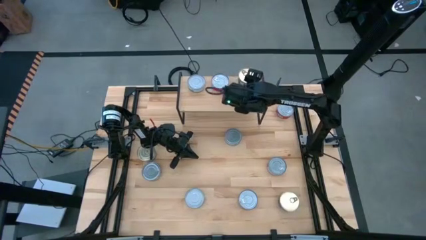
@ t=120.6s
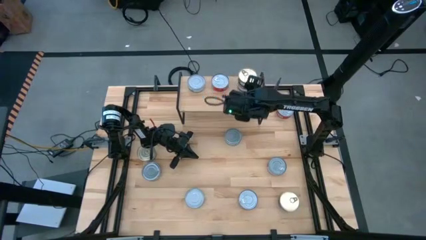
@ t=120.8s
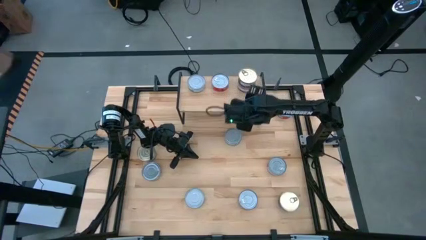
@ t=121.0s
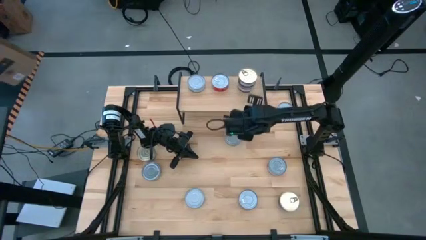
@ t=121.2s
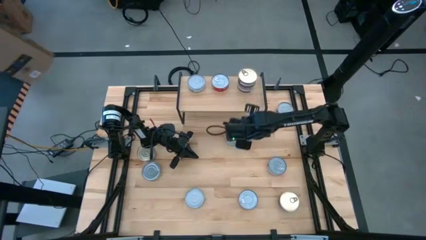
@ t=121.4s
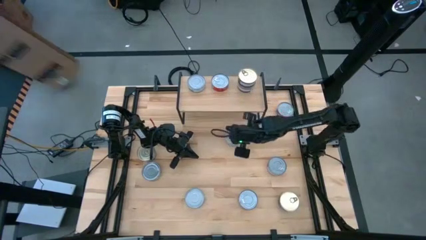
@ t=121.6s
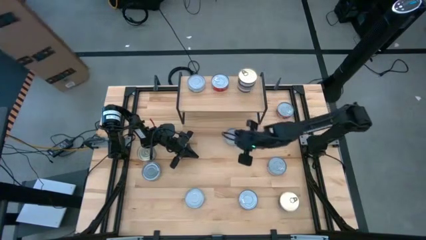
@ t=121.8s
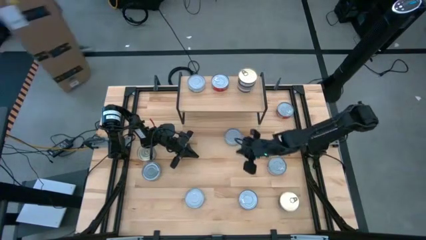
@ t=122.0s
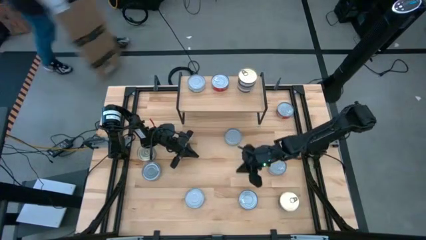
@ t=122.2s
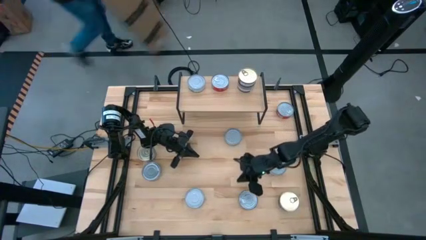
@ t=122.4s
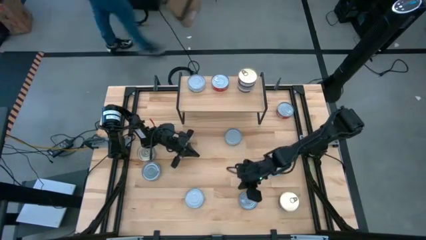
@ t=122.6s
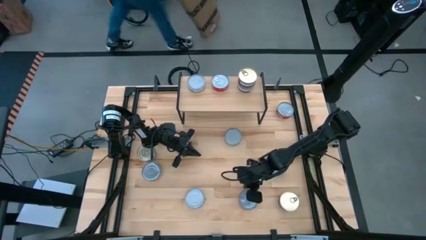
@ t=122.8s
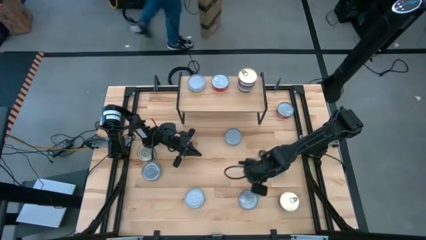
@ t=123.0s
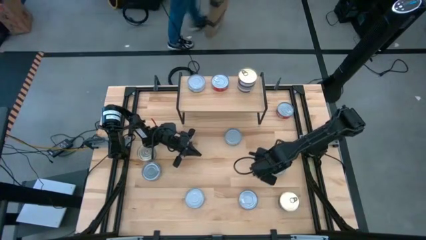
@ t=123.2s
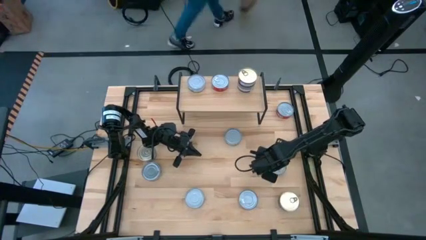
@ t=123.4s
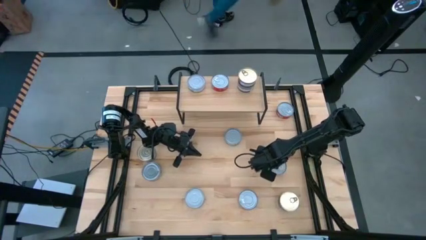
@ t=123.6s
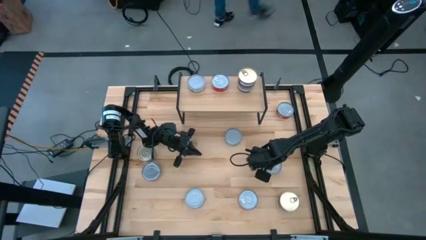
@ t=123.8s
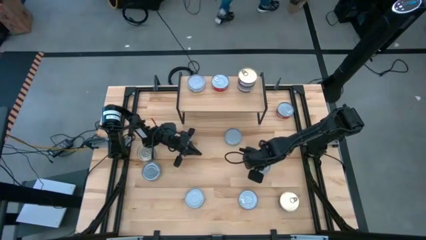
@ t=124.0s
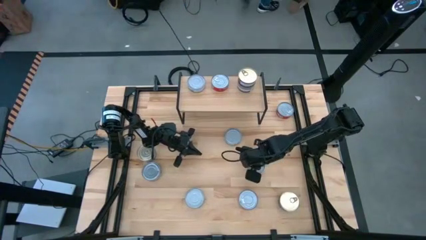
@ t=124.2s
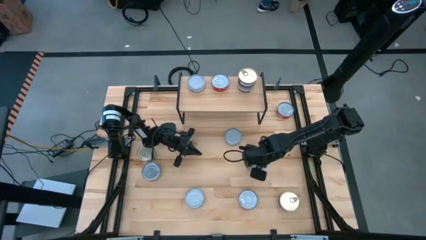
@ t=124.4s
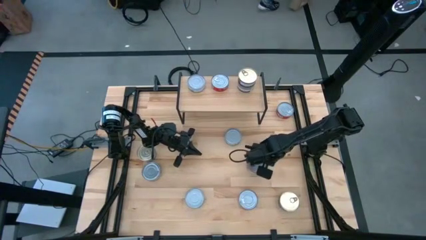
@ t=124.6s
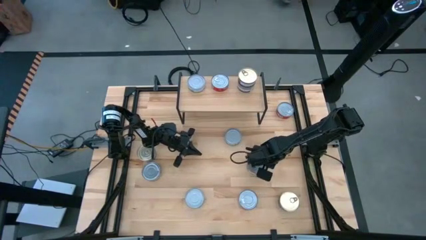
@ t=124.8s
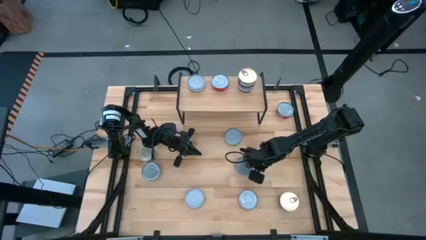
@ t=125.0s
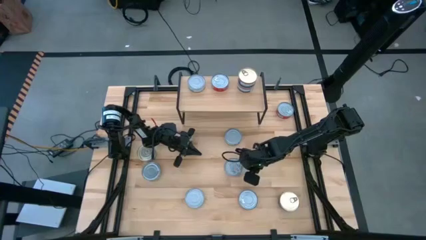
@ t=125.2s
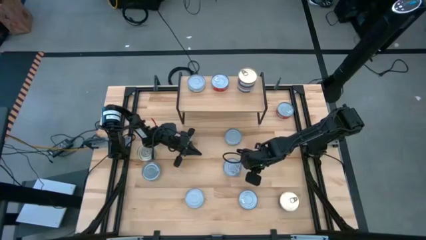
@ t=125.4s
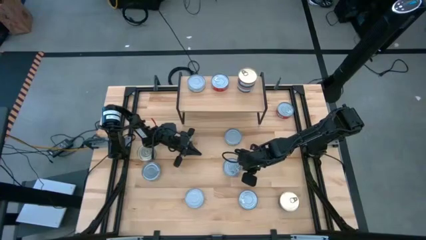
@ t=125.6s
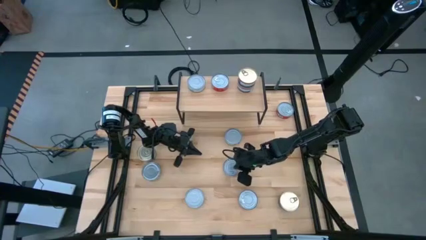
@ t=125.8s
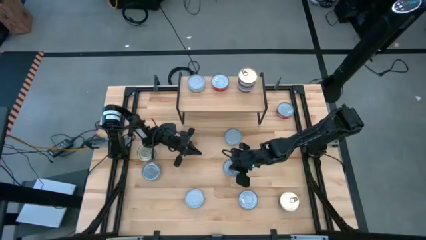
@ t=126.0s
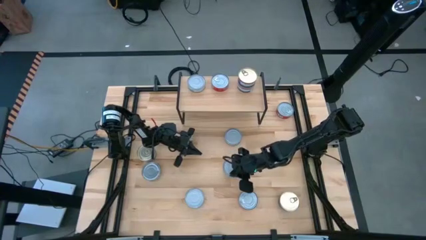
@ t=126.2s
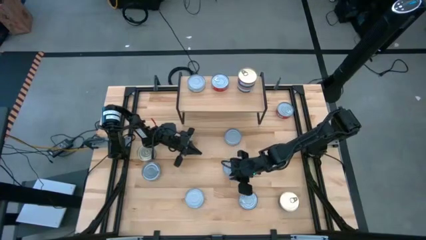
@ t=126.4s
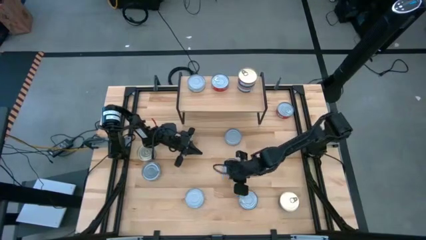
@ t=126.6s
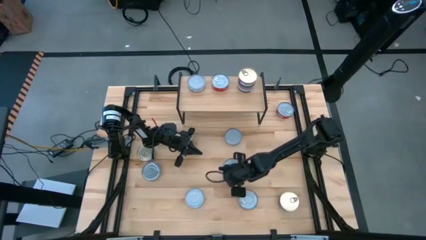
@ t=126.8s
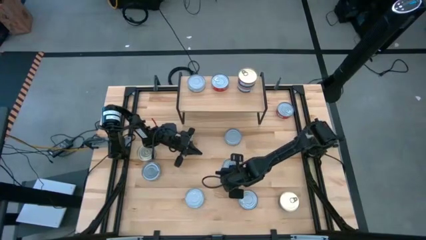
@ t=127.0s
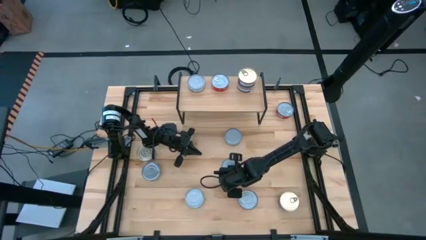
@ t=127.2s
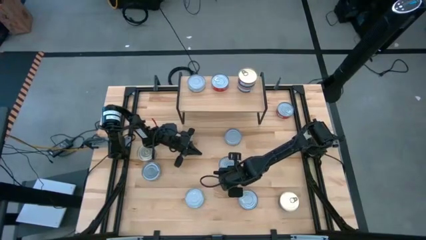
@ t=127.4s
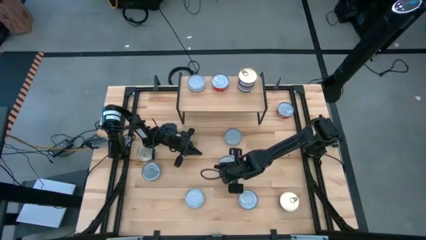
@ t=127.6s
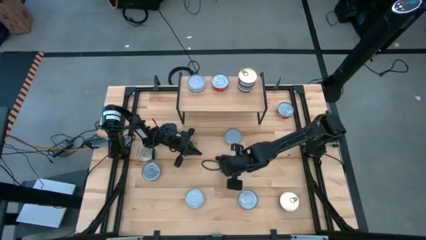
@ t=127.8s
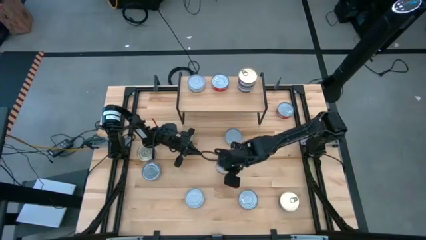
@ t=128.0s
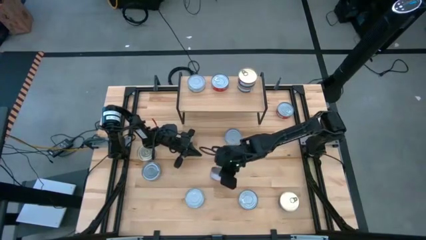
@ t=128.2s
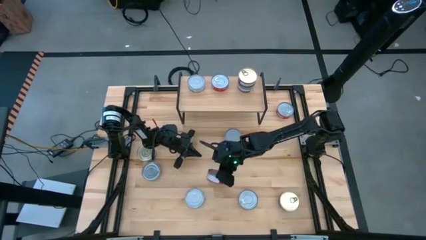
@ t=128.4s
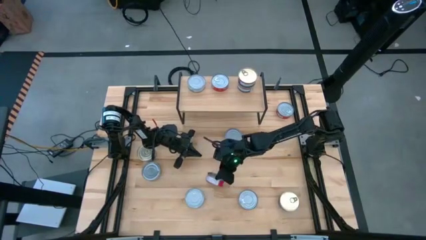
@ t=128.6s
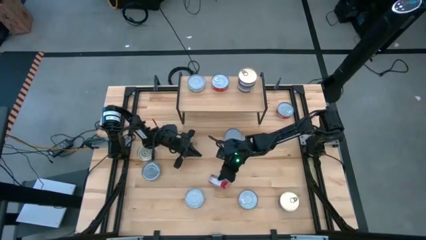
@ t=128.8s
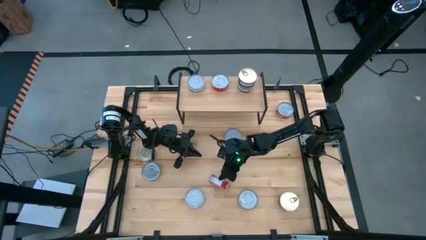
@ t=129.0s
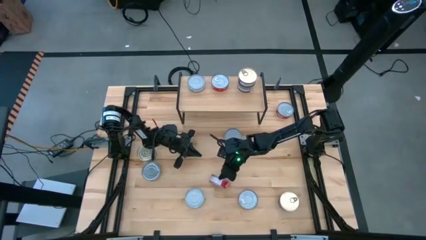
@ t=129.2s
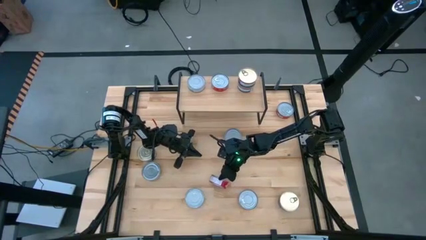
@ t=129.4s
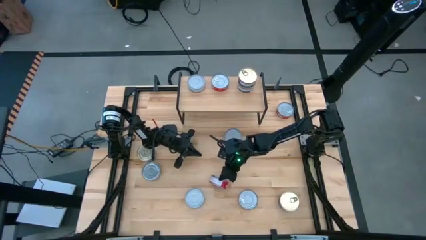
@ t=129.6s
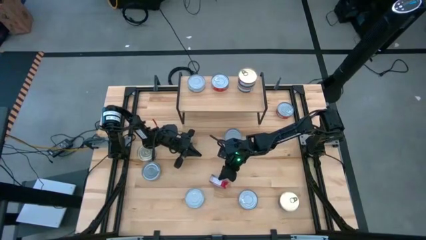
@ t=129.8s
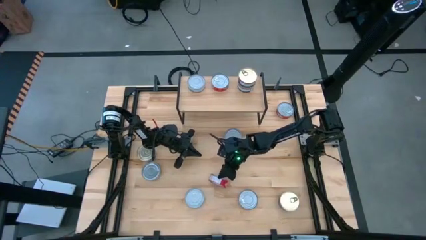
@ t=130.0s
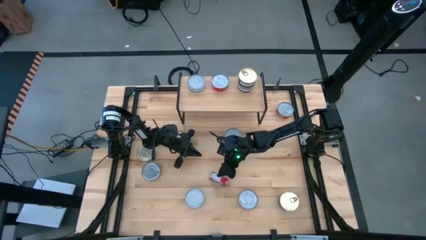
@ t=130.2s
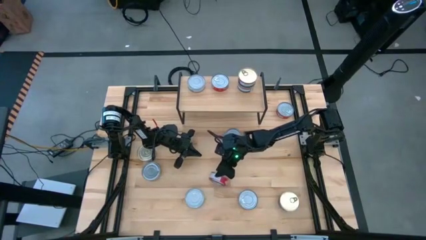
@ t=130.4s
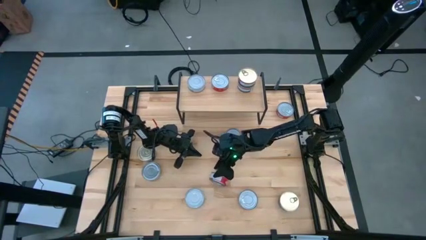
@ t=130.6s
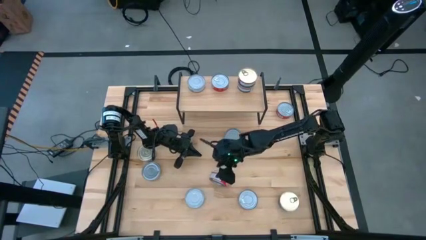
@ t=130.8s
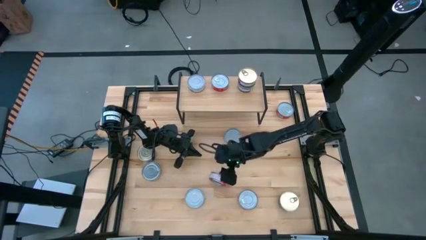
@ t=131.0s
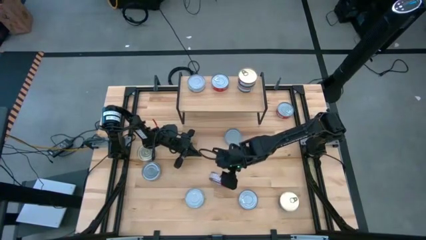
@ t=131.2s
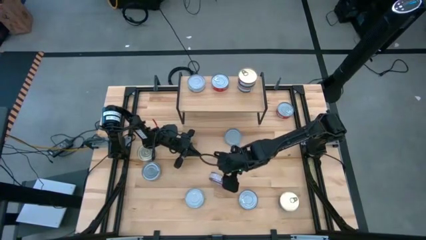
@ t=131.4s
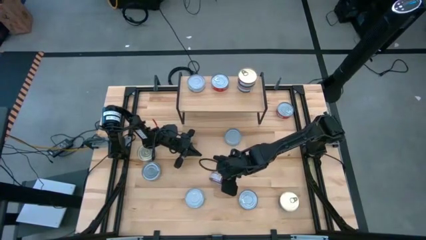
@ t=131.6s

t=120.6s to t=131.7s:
Task: Stack canned seafood by type on shelf
Stack the blue and pink tuna can on top of the blue and pink tuna can on the shelf

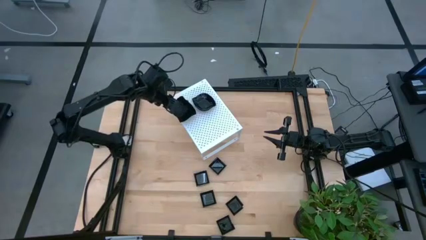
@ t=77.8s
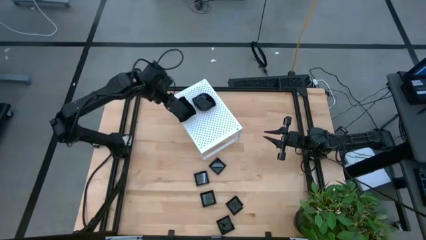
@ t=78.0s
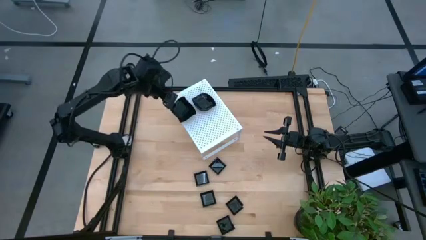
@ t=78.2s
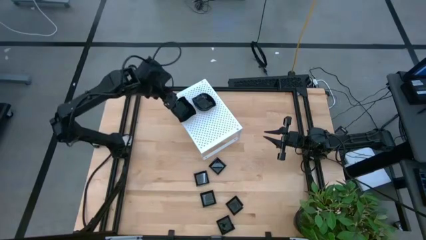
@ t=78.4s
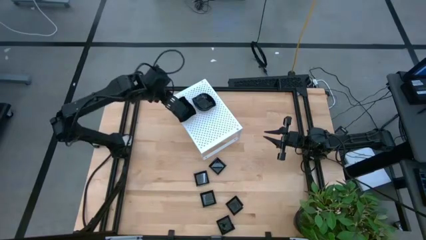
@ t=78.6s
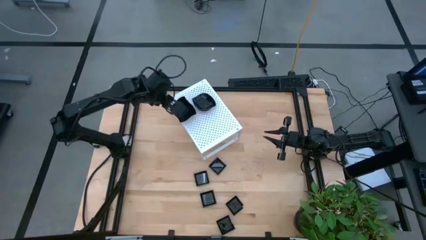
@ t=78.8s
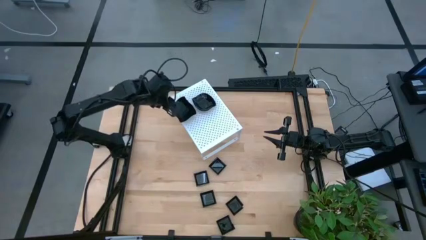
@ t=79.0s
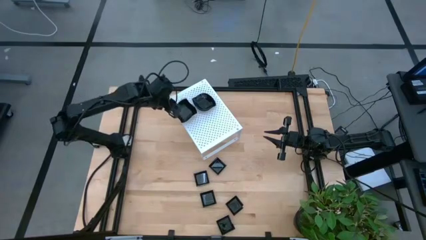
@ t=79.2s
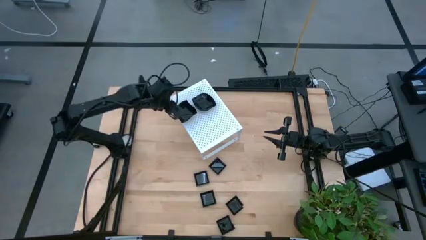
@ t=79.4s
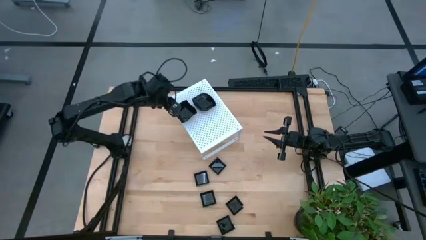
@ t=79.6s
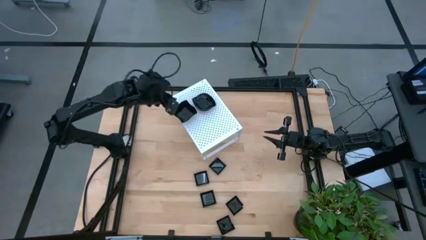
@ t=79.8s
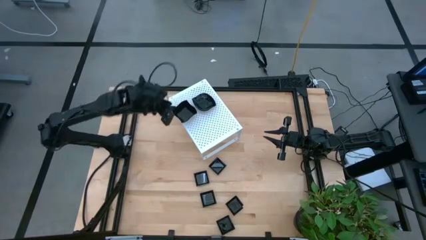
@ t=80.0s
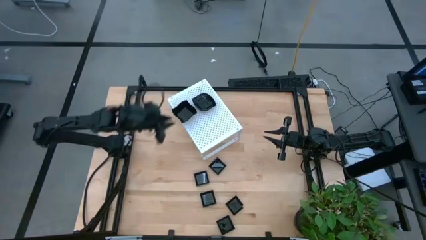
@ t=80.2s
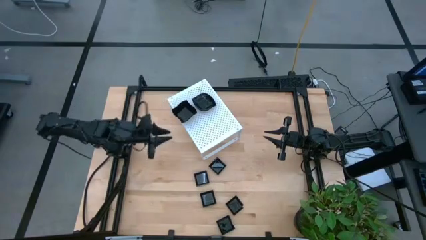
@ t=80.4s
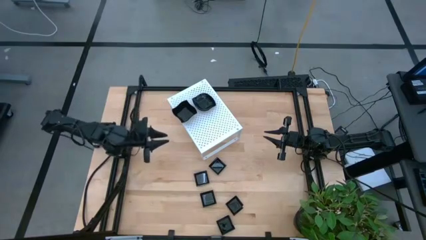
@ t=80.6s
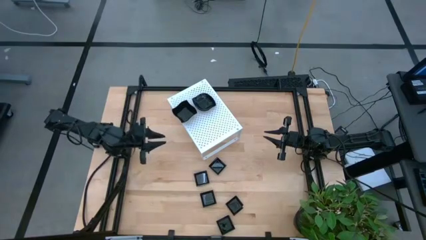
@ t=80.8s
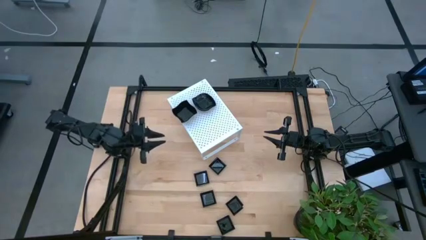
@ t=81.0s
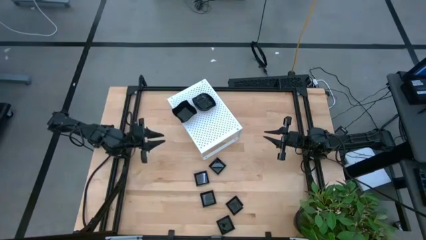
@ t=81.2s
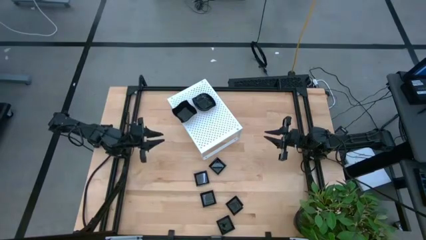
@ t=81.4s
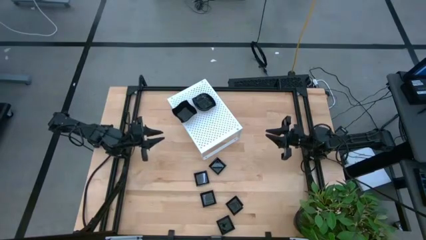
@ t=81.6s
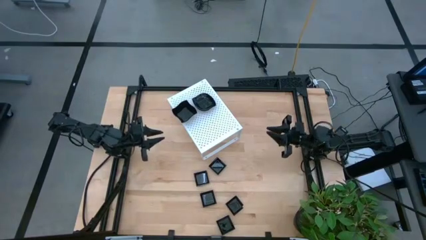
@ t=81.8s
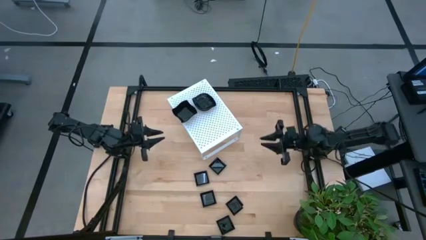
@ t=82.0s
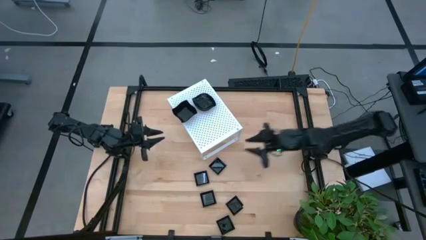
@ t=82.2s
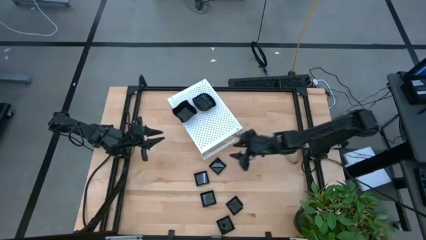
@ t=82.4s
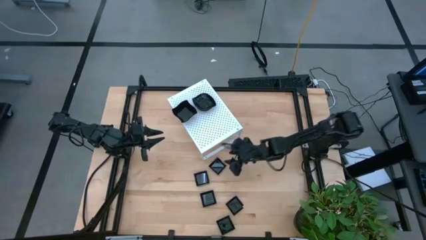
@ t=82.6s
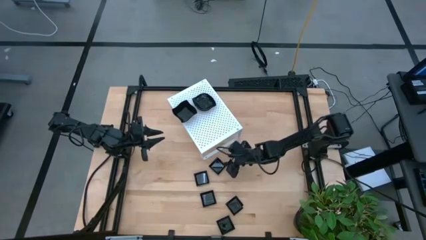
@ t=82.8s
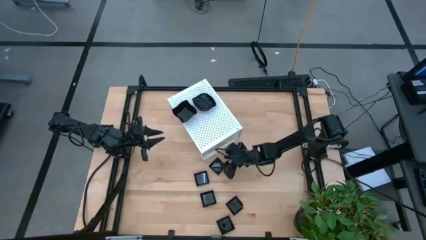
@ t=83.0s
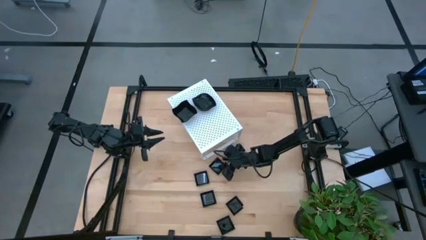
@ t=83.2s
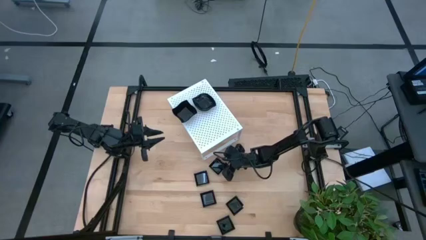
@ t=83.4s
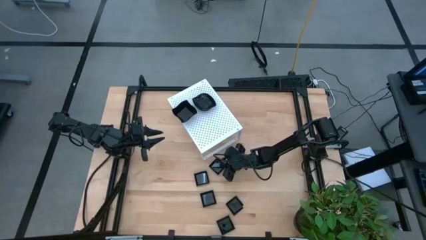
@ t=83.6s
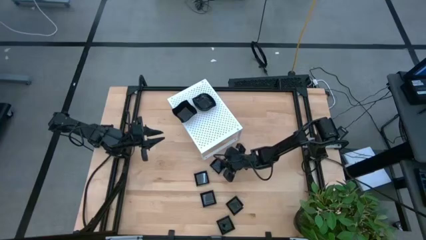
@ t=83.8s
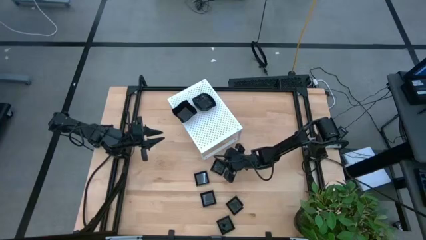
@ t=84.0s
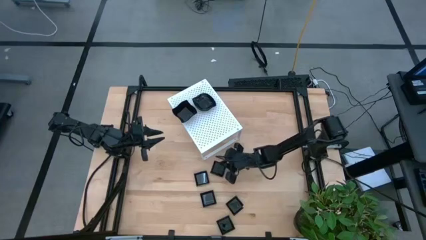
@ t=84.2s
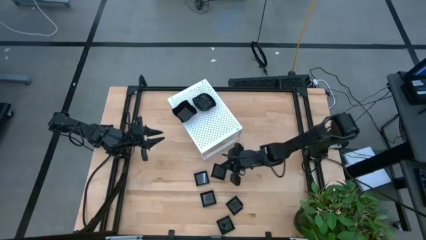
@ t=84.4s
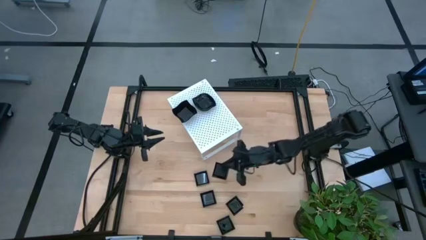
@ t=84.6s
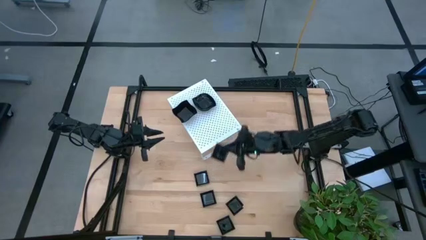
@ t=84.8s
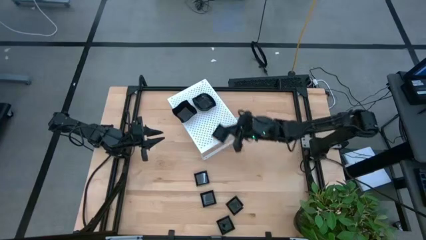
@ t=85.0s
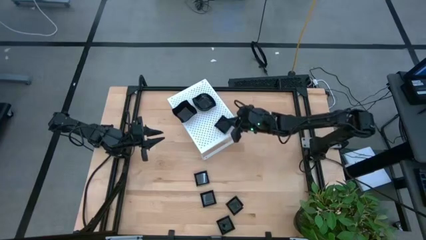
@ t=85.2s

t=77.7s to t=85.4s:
Task: Pick & Place Mini shaped plates
Put the square plate on the shelf
